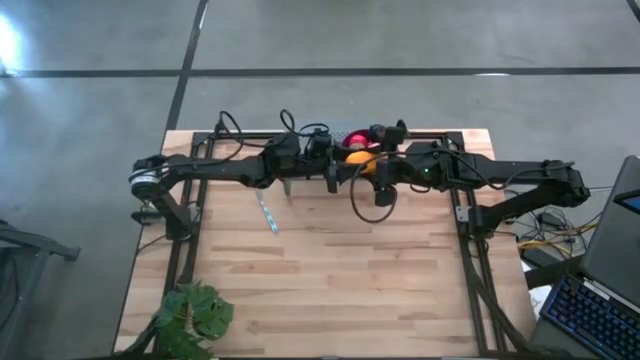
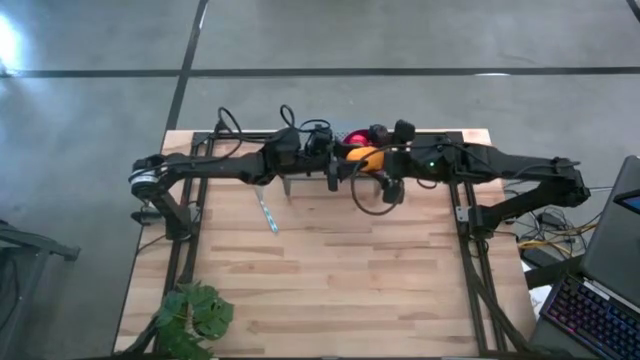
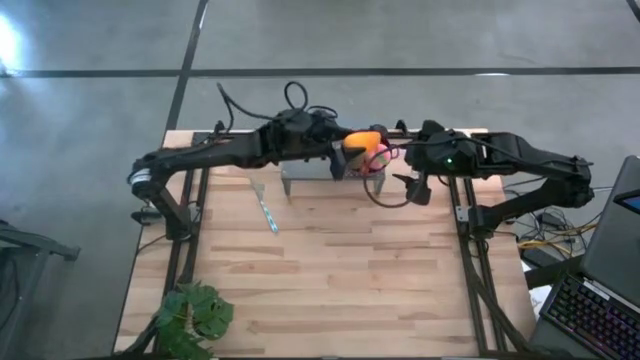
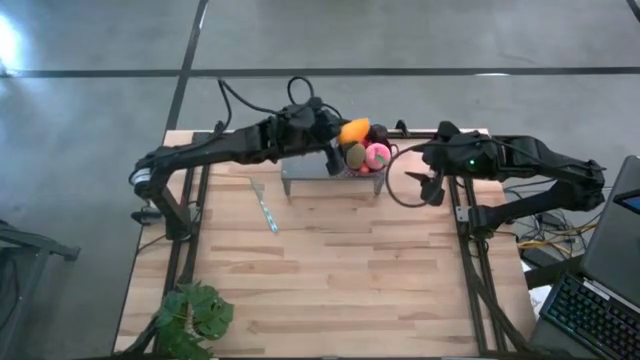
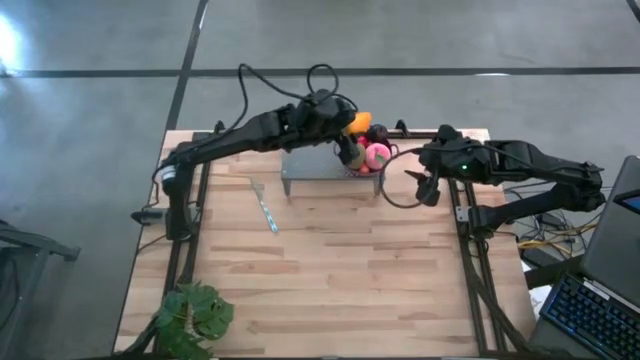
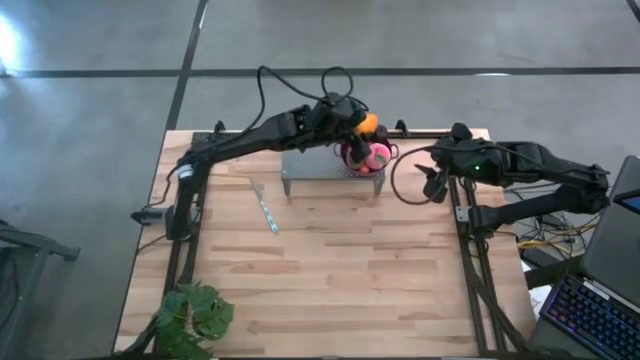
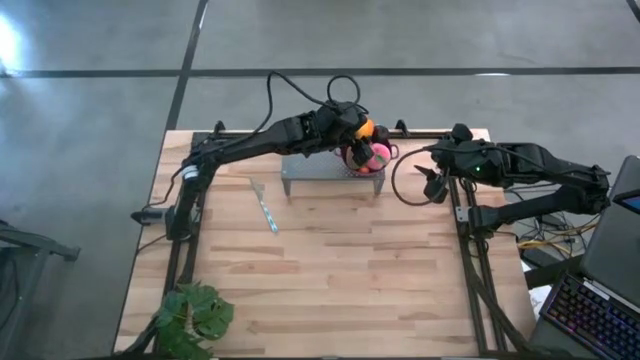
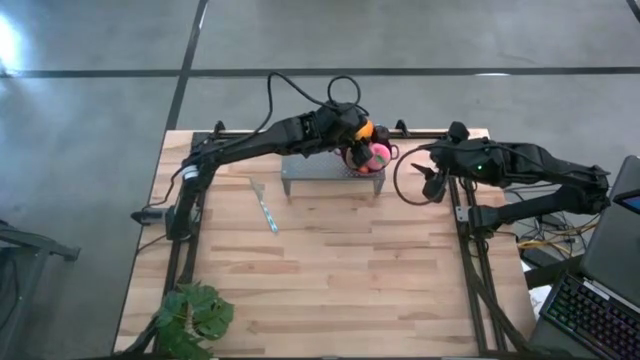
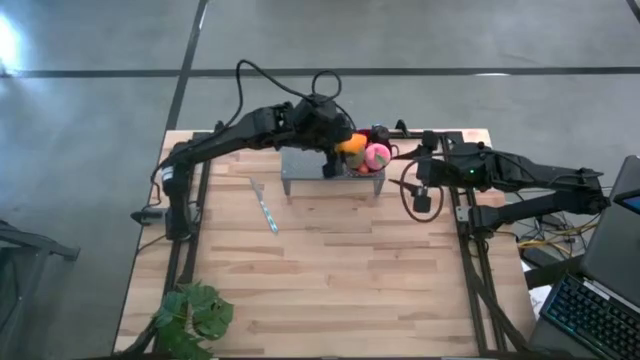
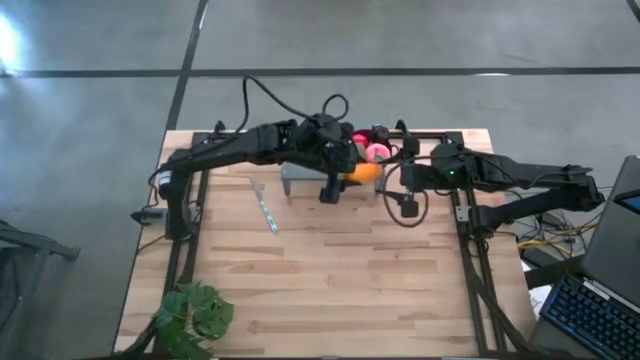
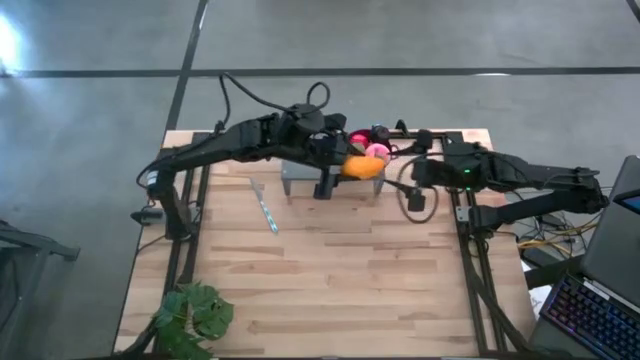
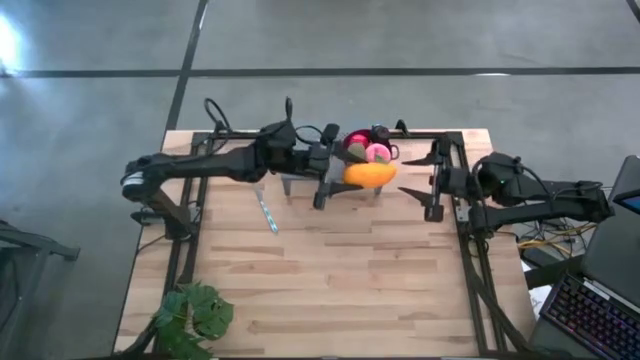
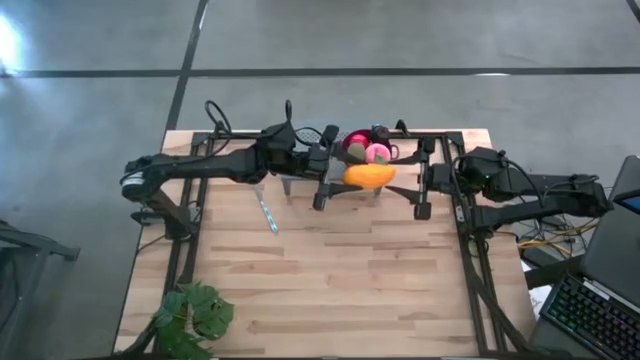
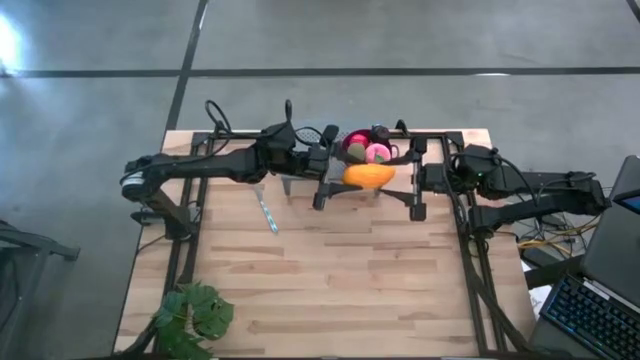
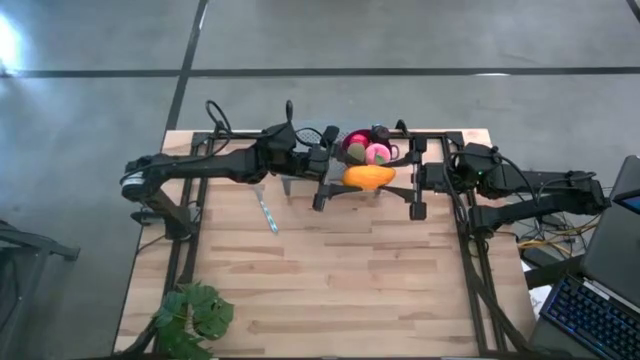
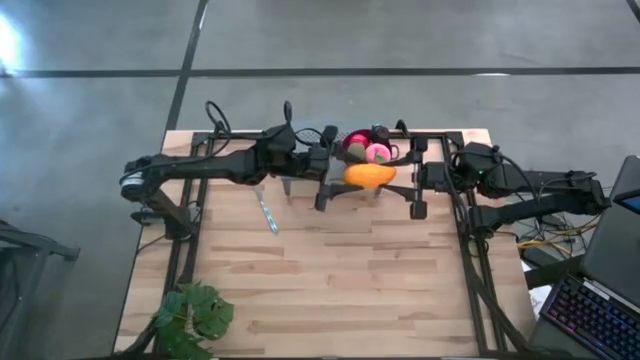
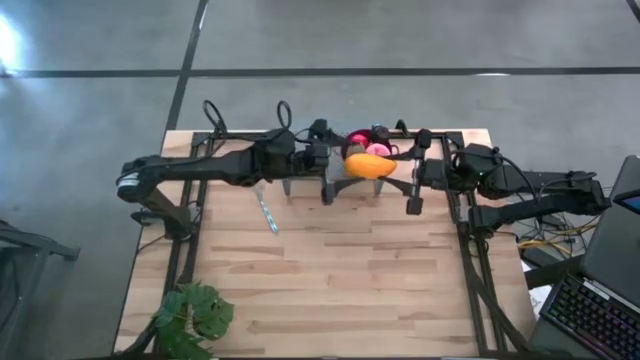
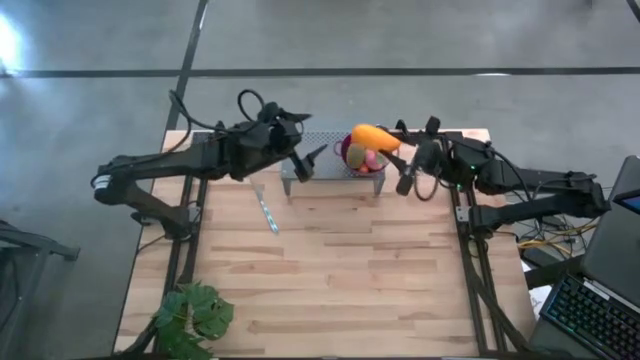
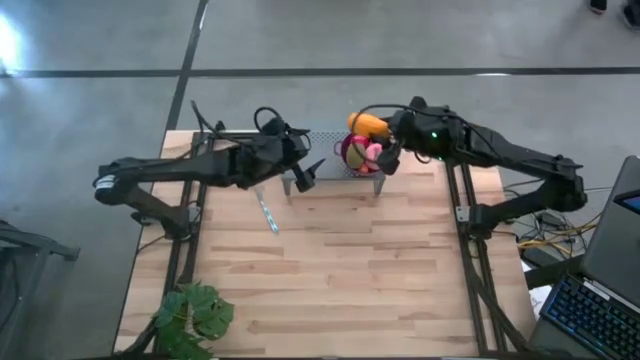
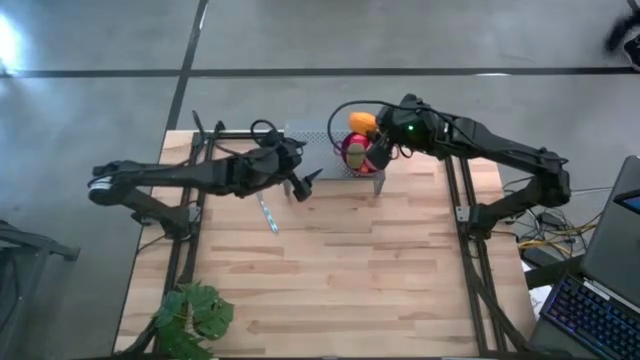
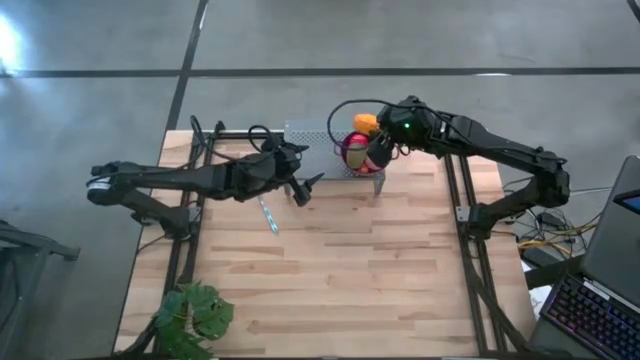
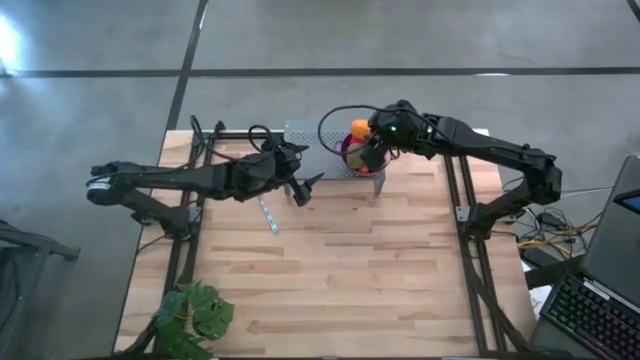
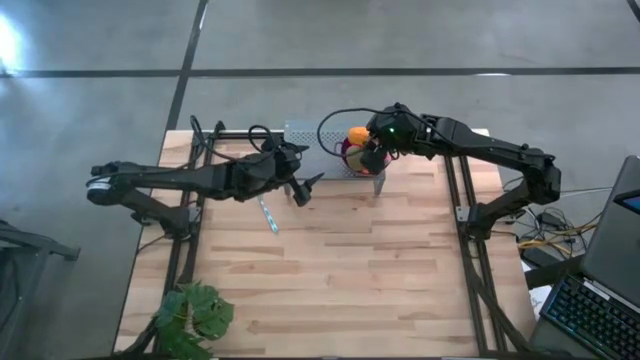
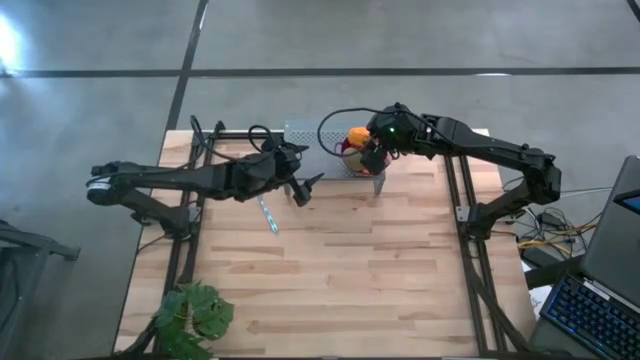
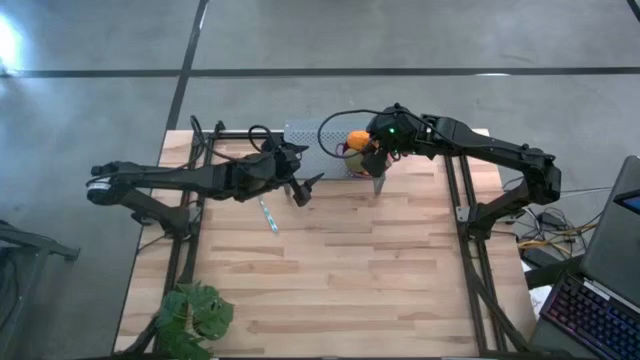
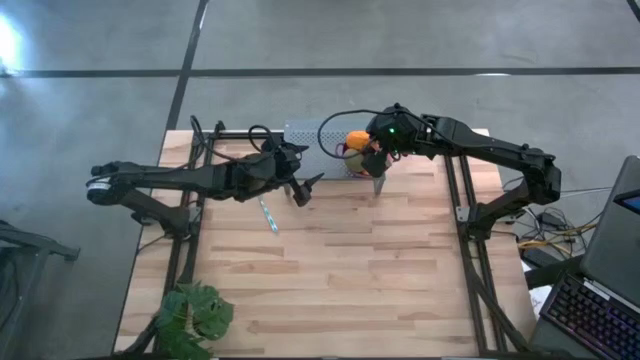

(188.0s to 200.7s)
Task: Pick & Place Fruit
Put the mango into the purple bowl on the shelf

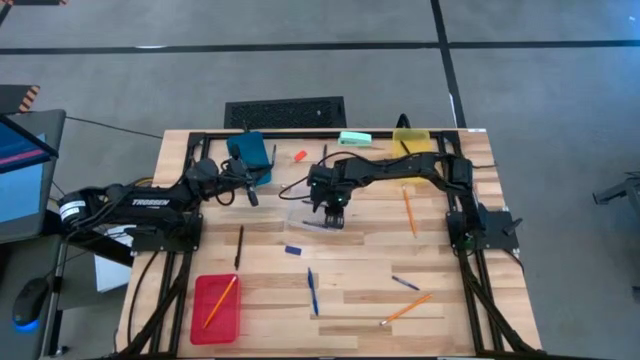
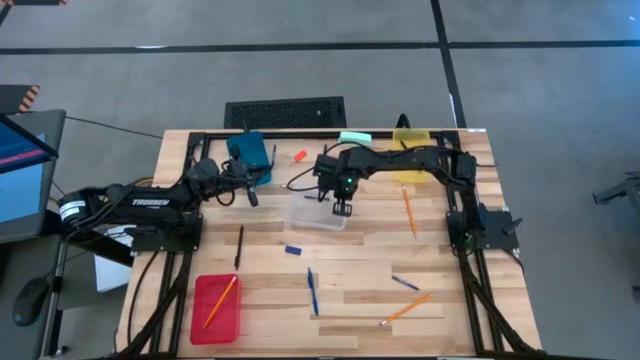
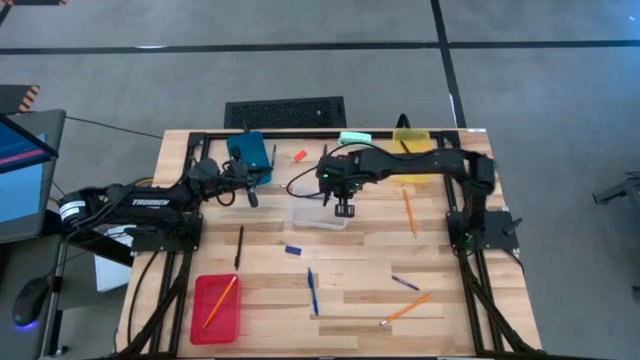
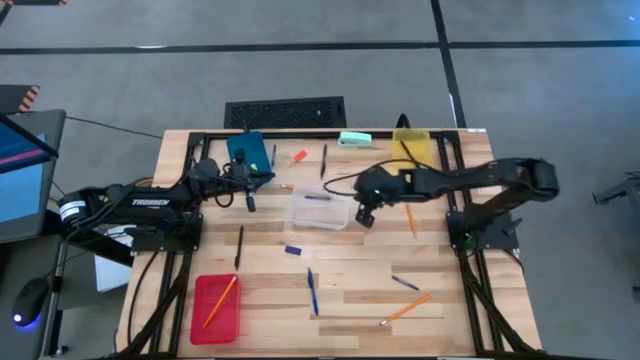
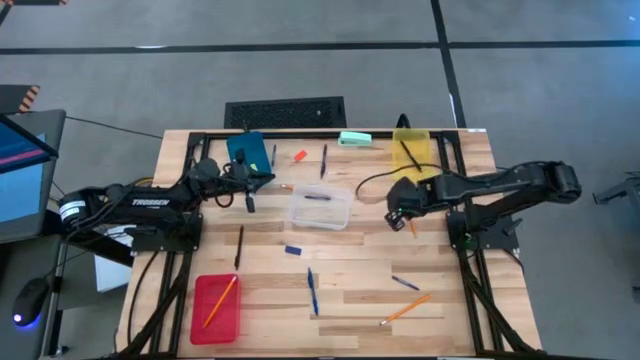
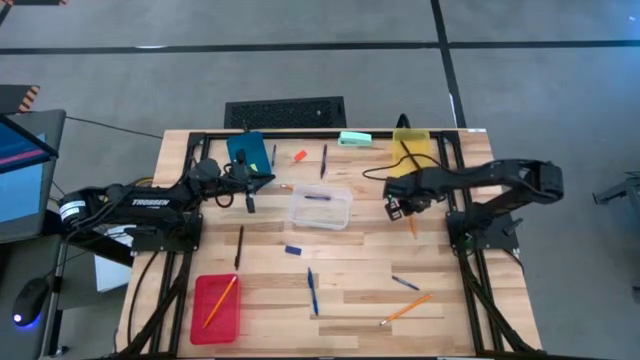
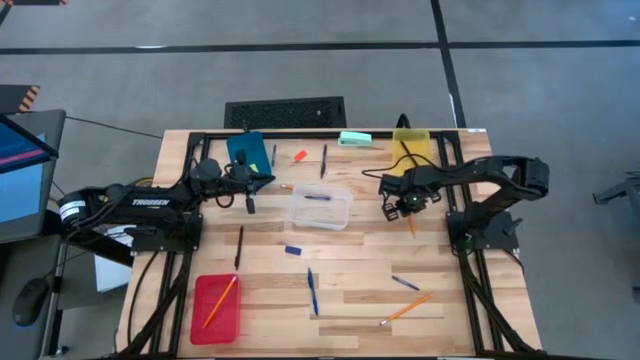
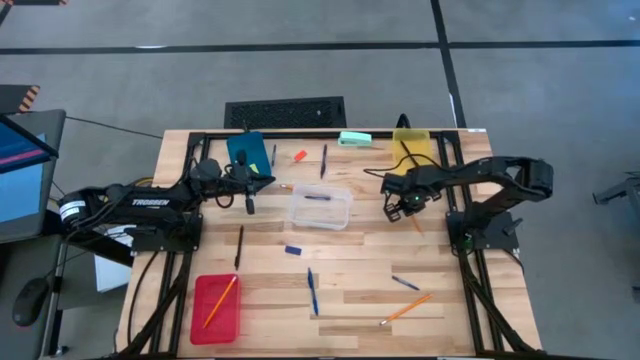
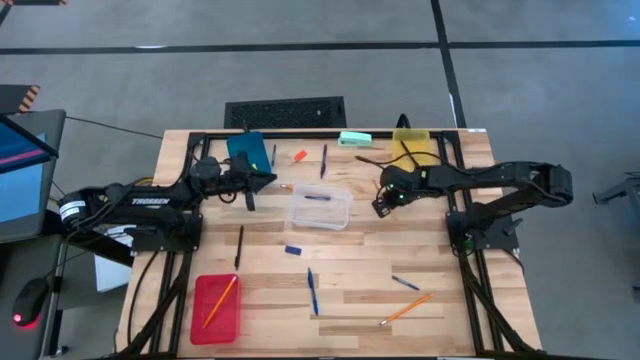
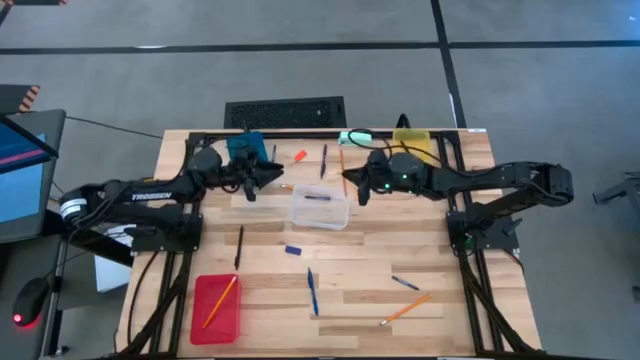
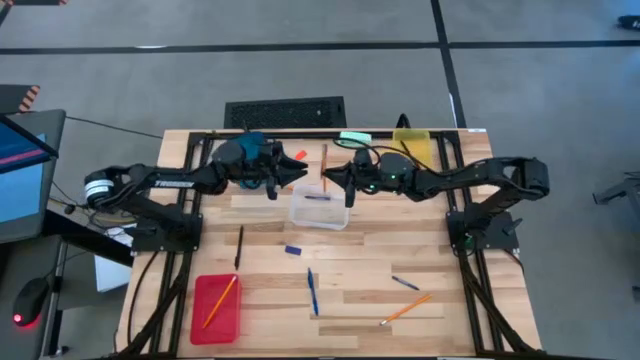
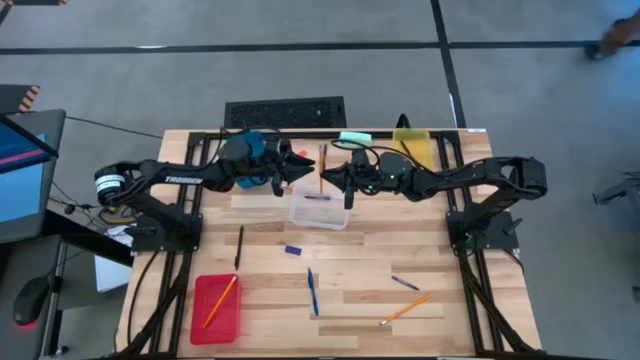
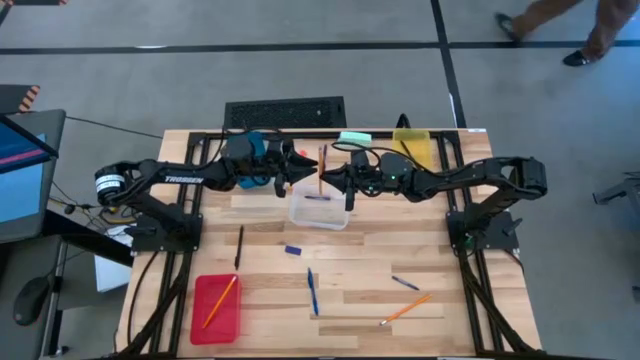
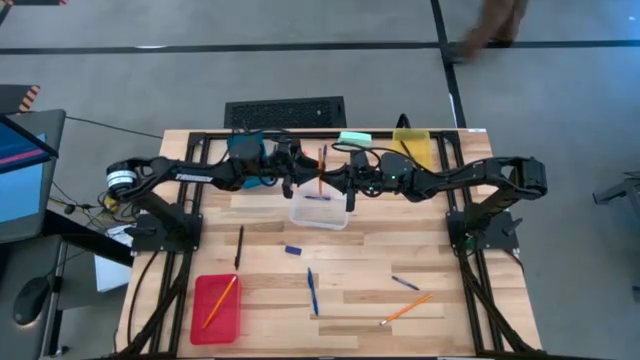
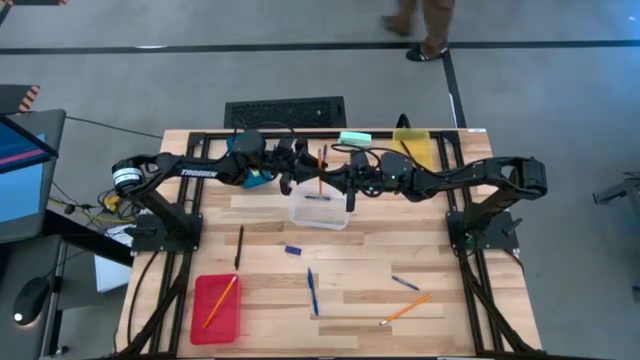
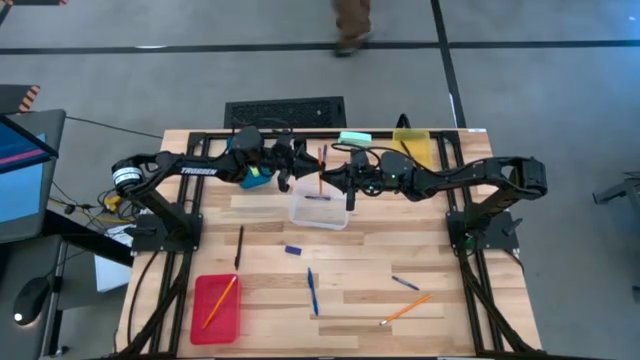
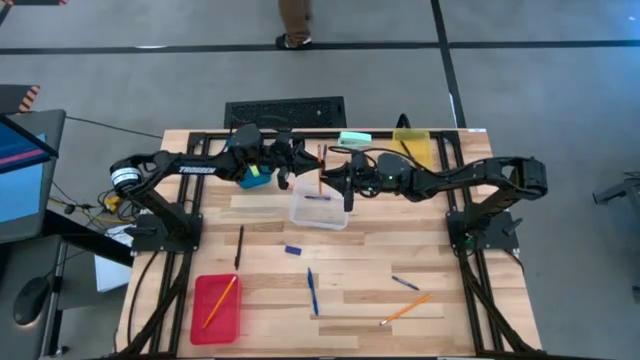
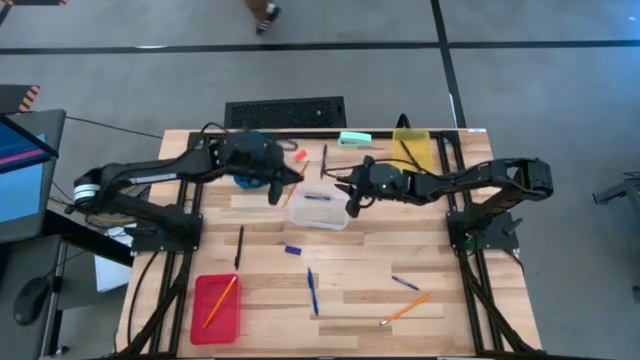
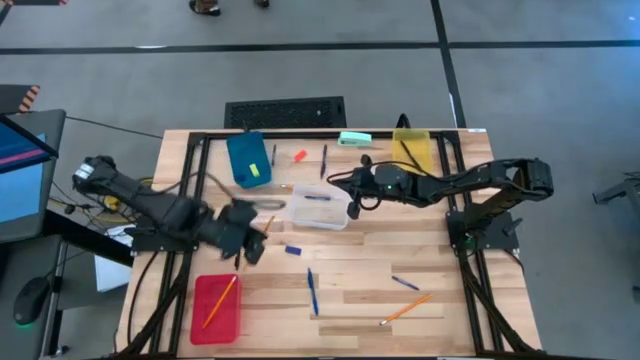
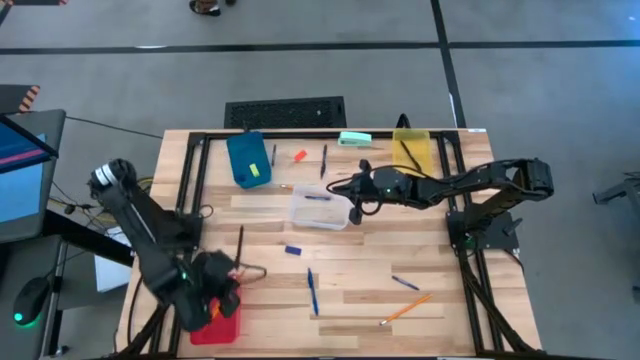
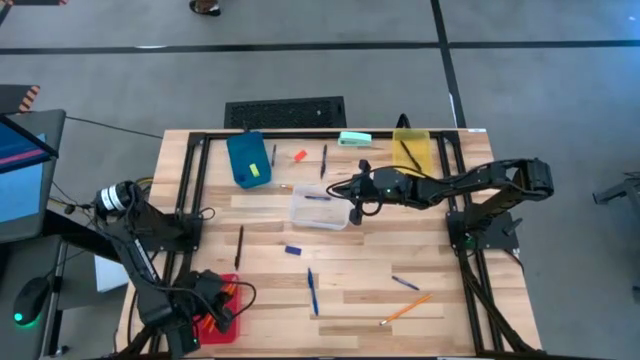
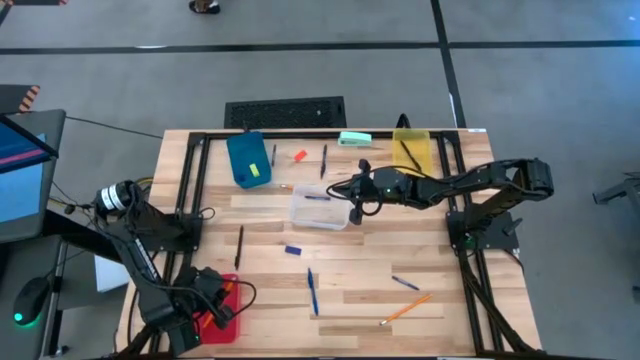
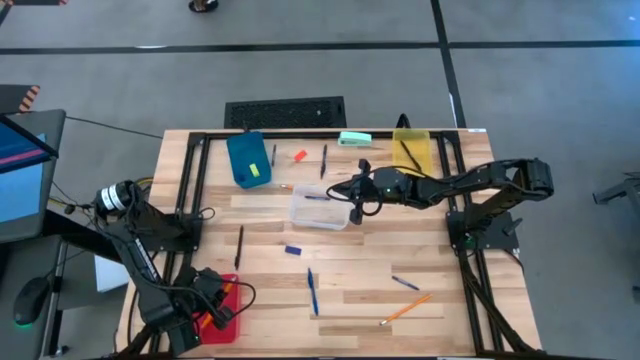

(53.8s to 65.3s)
Task: Sort crayons/erasers/pens/pencils in bins
Put the top right yellow pencil into the red bin
